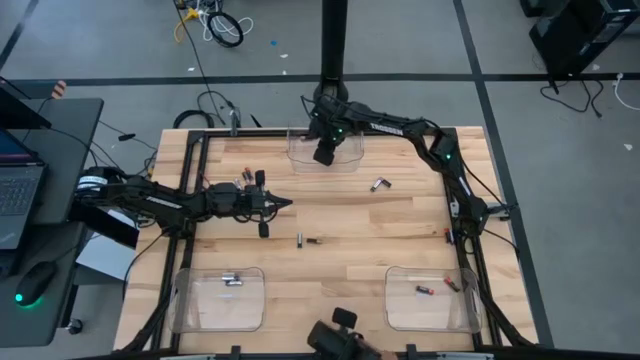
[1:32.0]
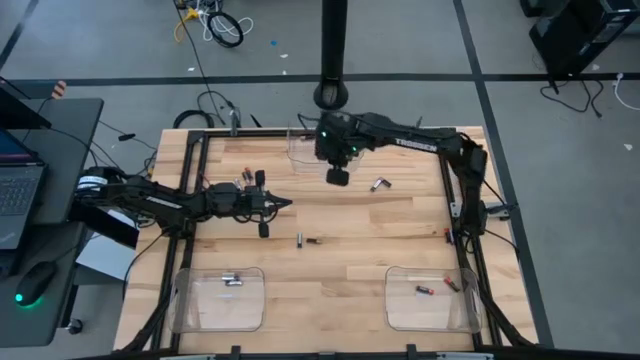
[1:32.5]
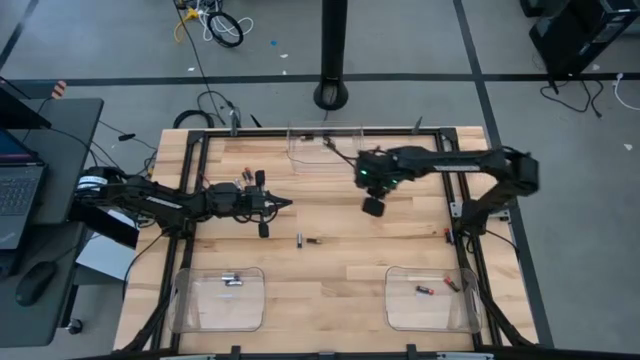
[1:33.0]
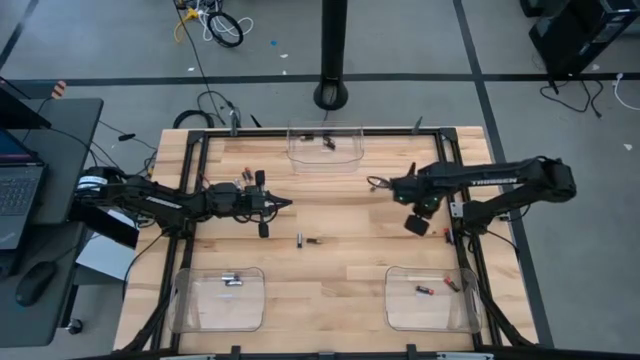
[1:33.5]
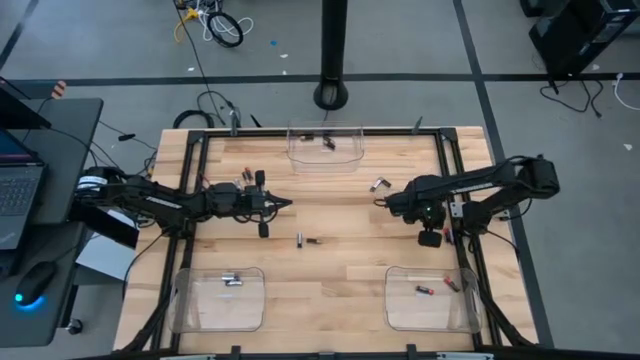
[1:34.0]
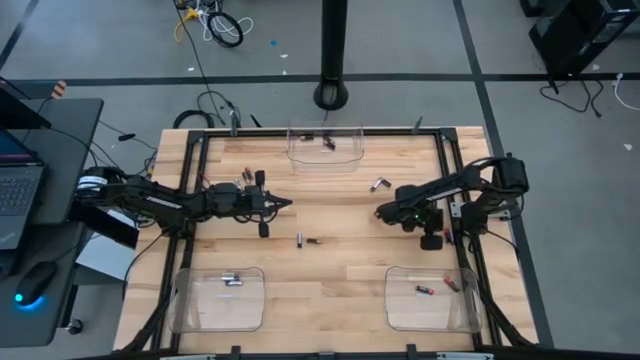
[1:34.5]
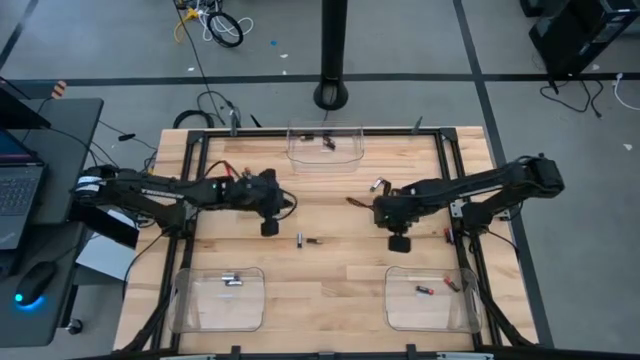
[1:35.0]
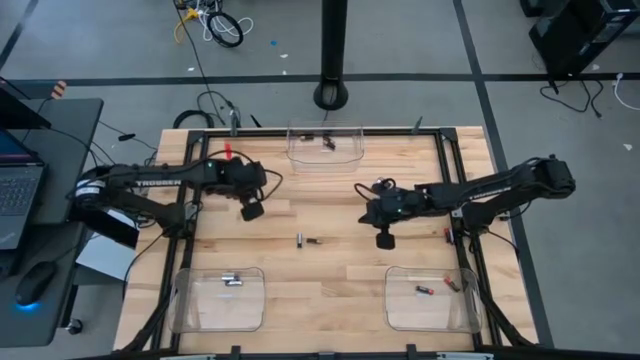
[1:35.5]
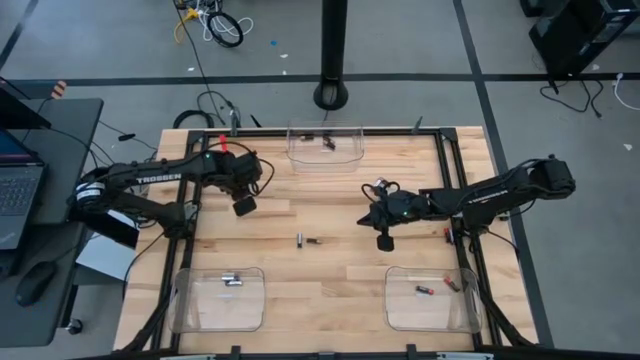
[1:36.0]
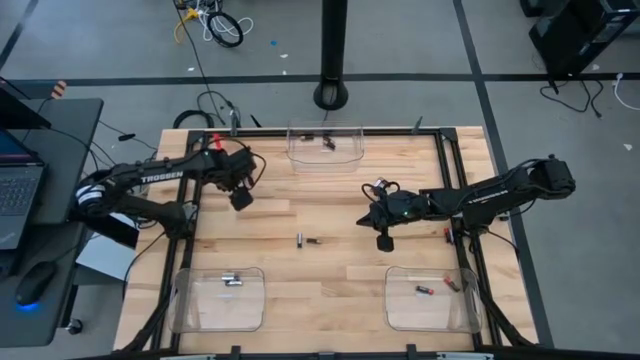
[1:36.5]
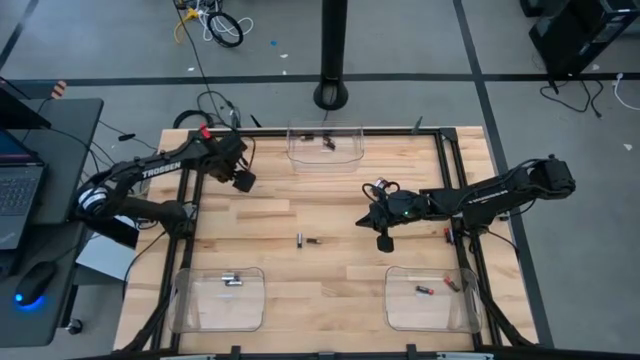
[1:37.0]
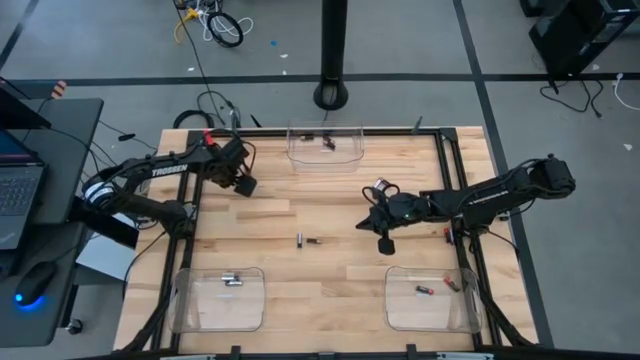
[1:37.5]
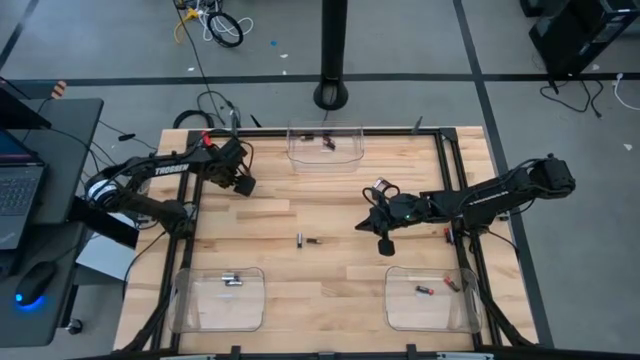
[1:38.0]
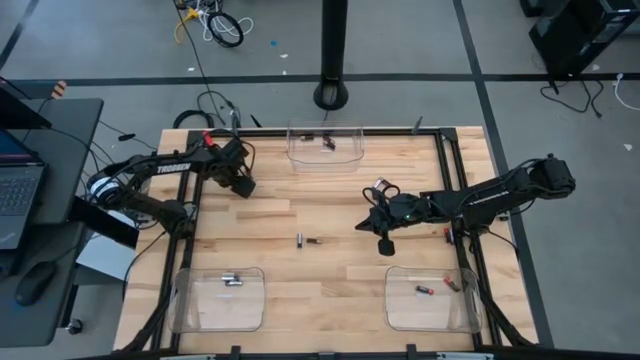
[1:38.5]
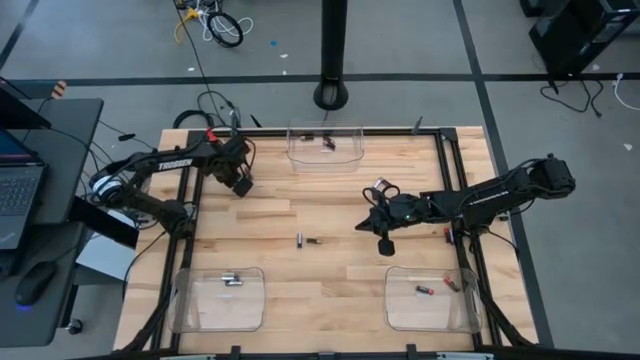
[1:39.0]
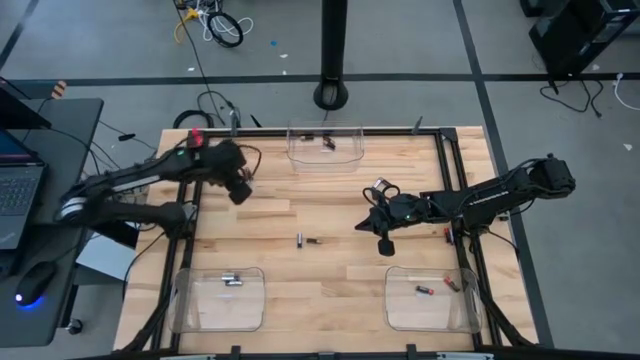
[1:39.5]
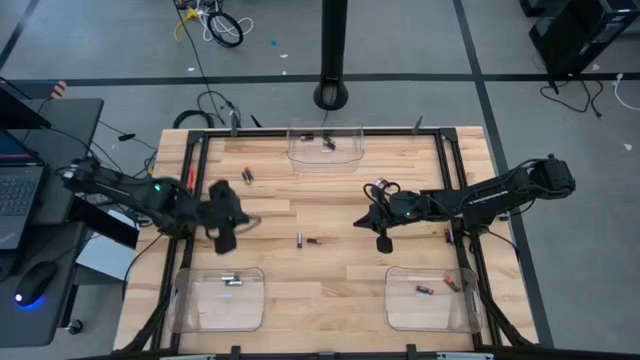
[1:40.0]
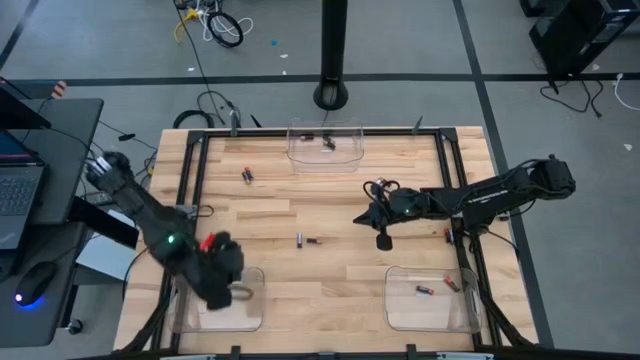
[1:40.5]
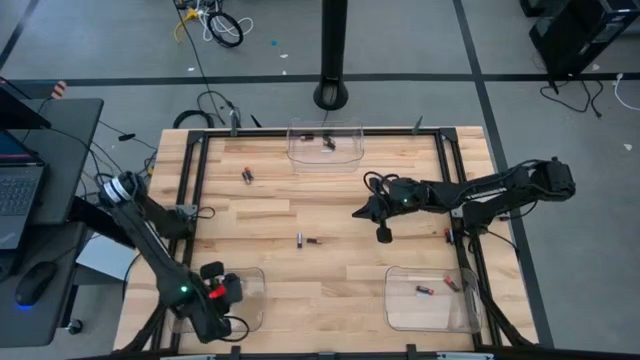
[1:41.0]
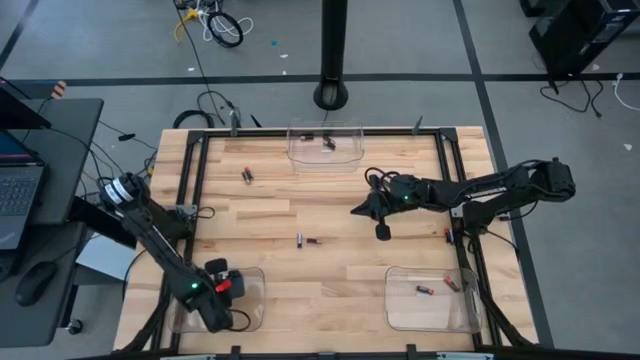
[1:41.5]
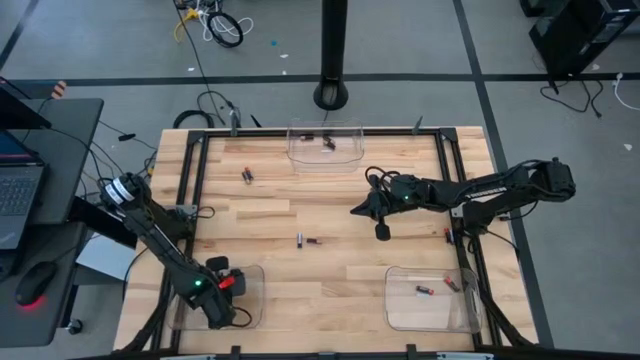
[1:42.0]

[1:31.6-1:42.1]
Task: Sort batteries
Put the silver battery into the bottom left transparent bin

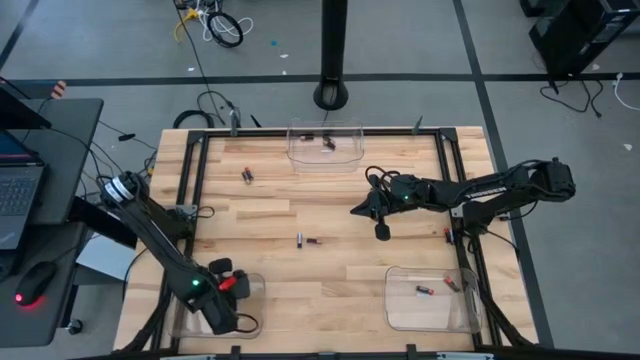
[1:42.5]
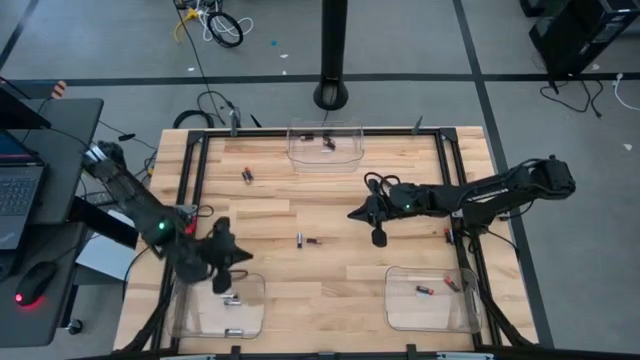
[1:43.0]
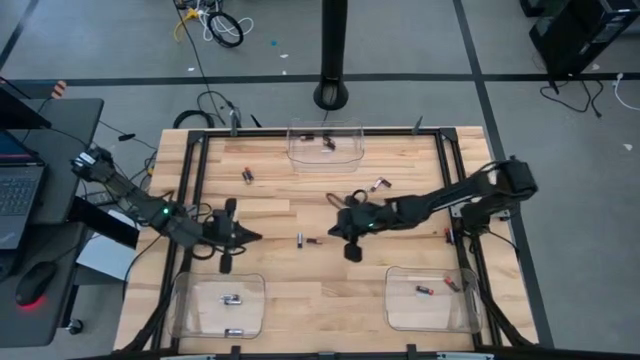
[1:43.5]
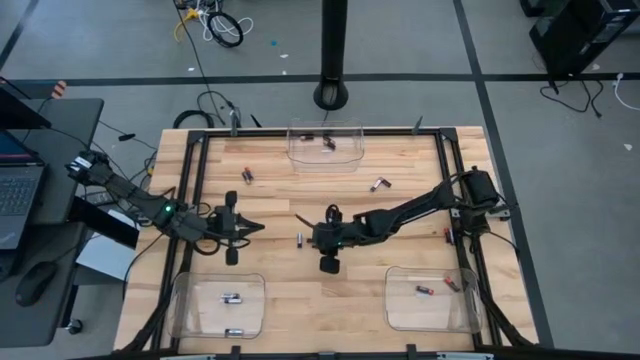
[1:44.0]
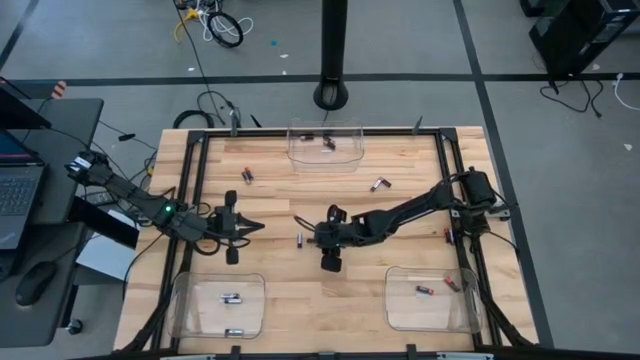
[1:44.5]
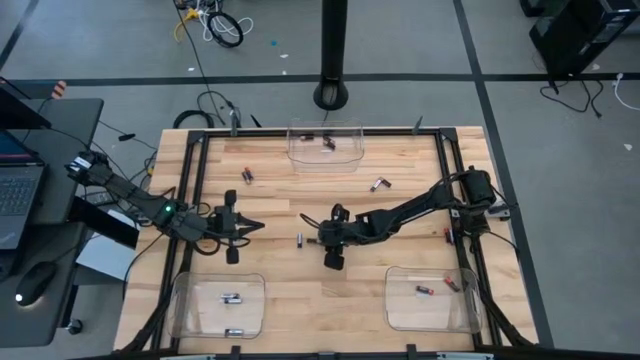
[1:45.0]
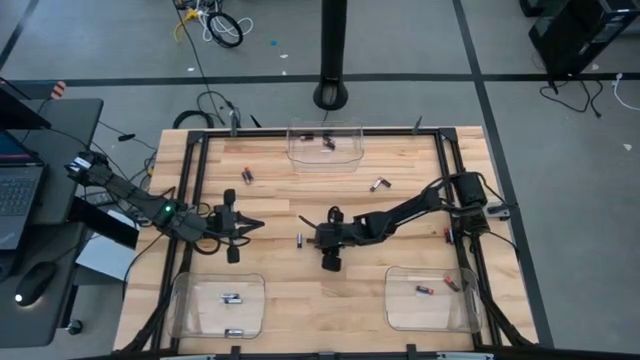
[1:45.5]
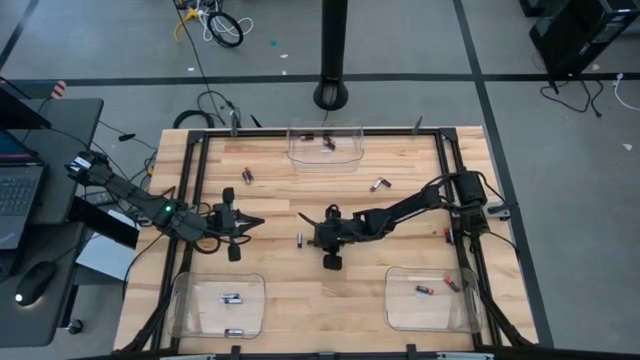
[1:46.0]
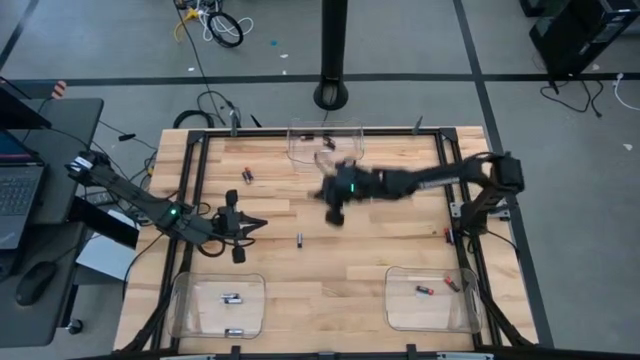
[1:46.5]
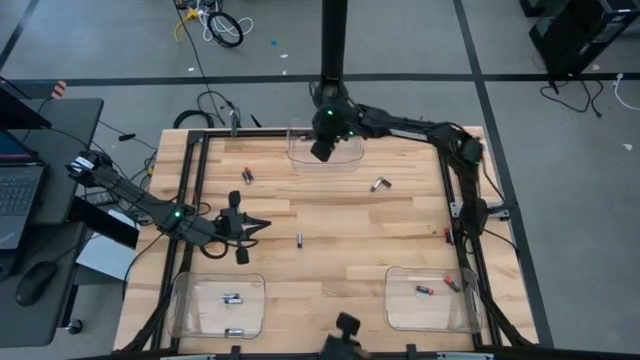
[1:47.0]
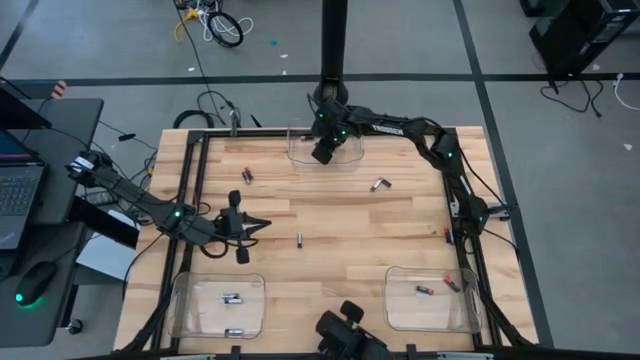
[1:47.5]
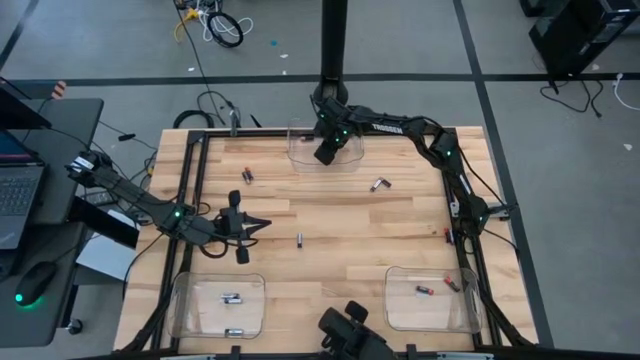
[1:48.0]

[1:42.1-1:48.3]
Put the brown battery into the top middle transparent bin
